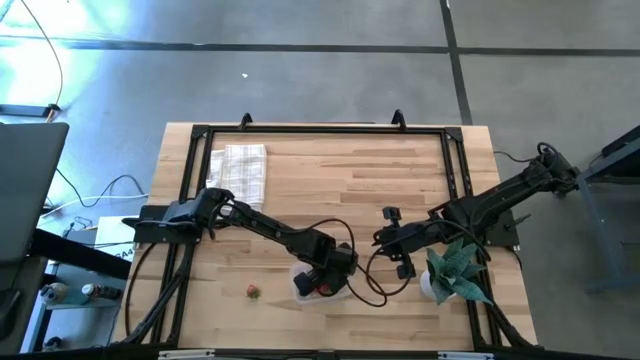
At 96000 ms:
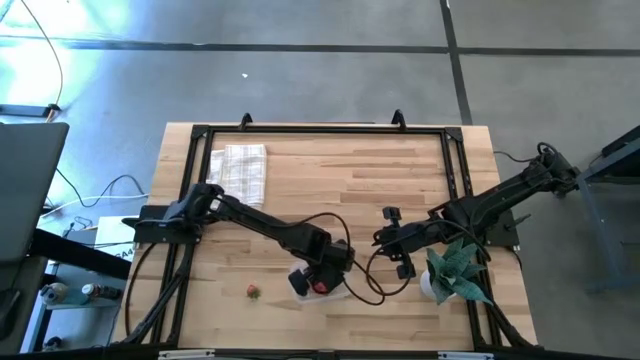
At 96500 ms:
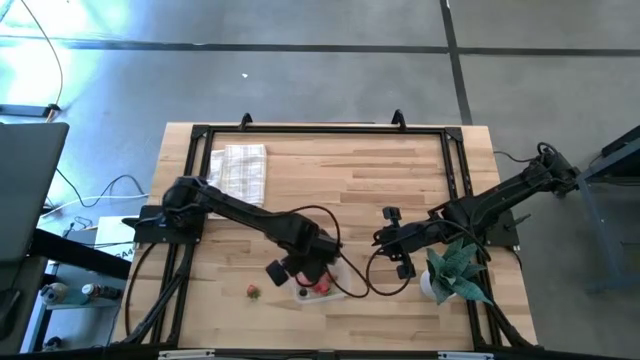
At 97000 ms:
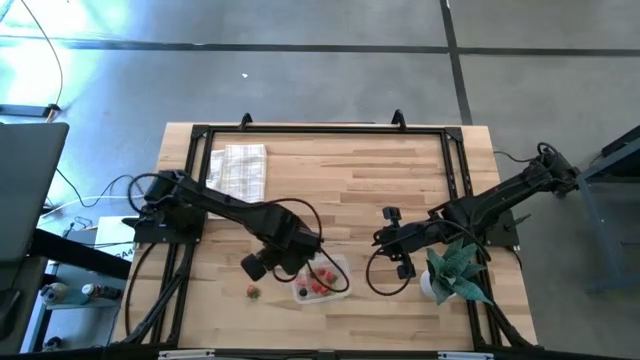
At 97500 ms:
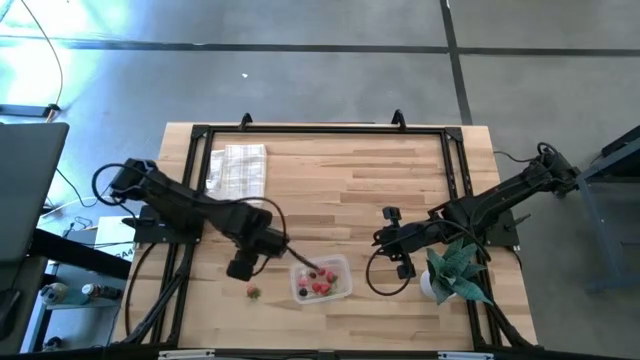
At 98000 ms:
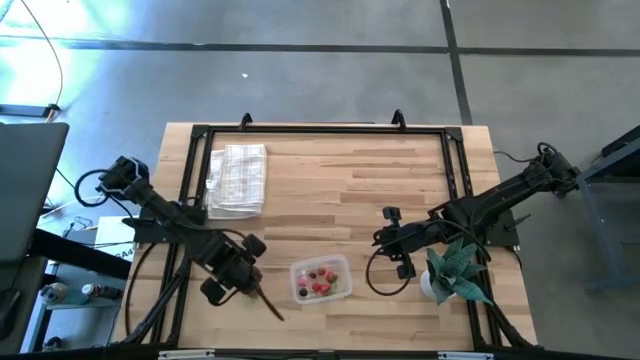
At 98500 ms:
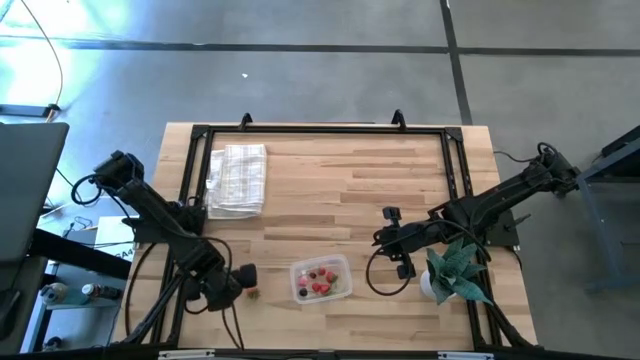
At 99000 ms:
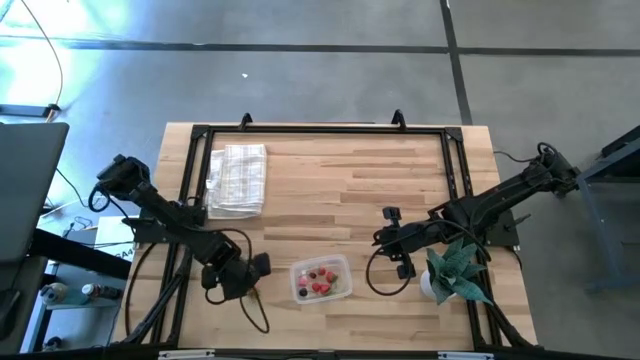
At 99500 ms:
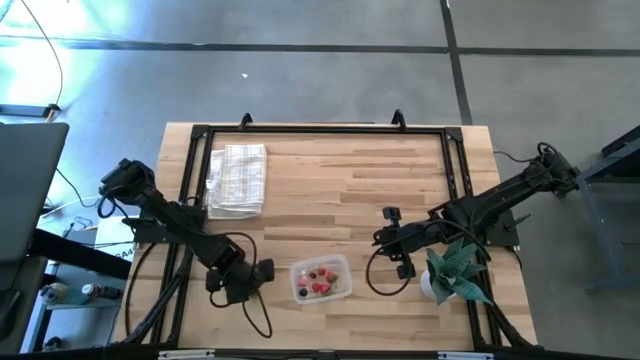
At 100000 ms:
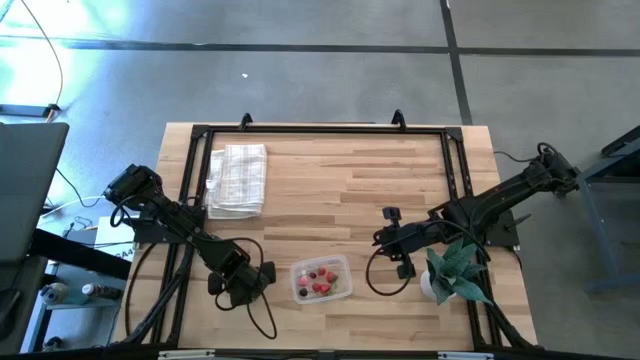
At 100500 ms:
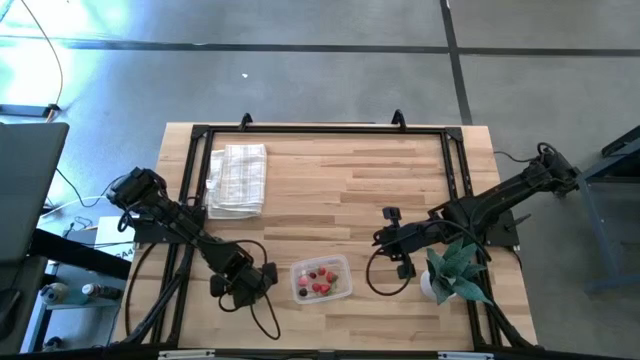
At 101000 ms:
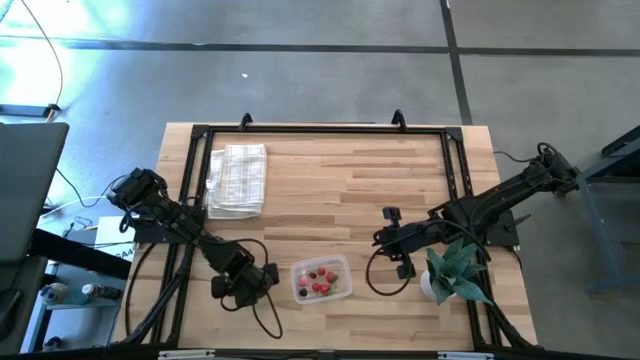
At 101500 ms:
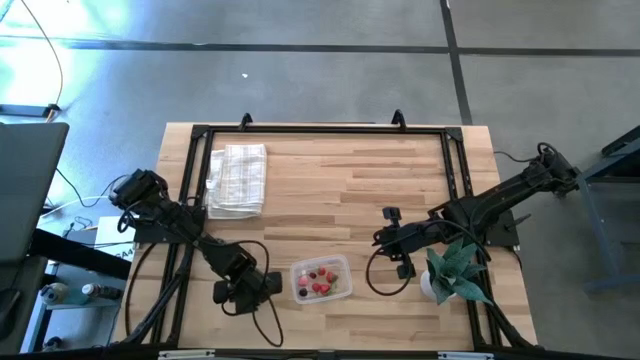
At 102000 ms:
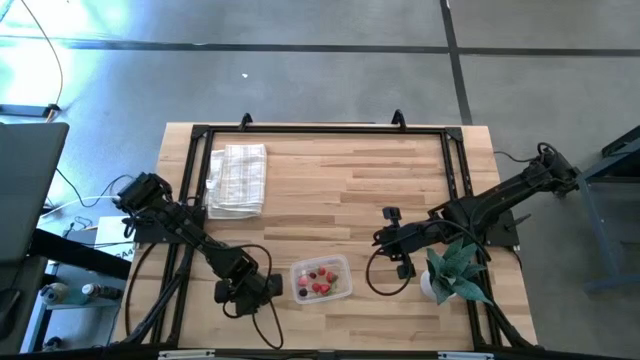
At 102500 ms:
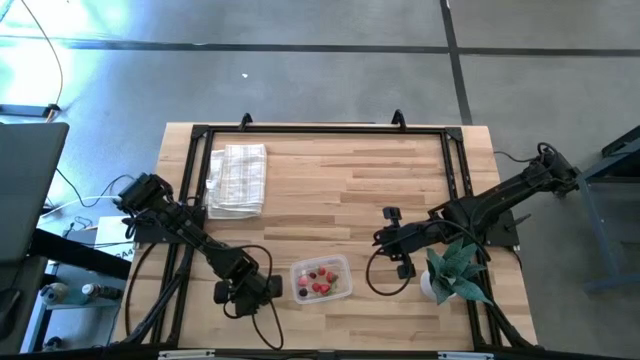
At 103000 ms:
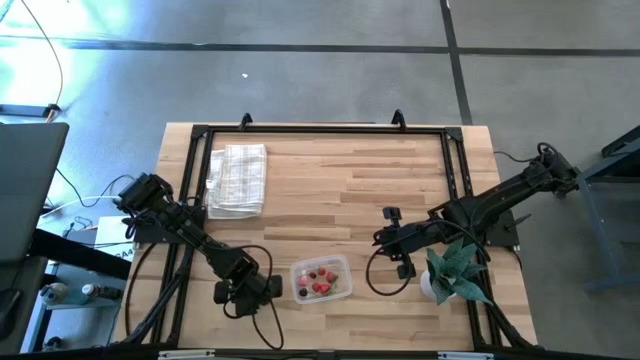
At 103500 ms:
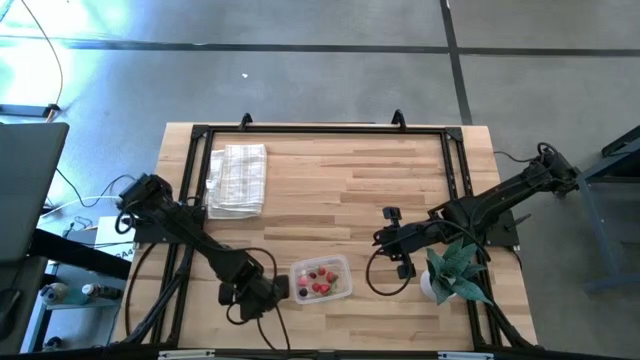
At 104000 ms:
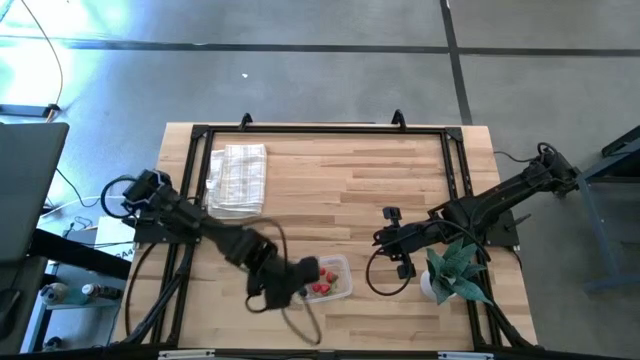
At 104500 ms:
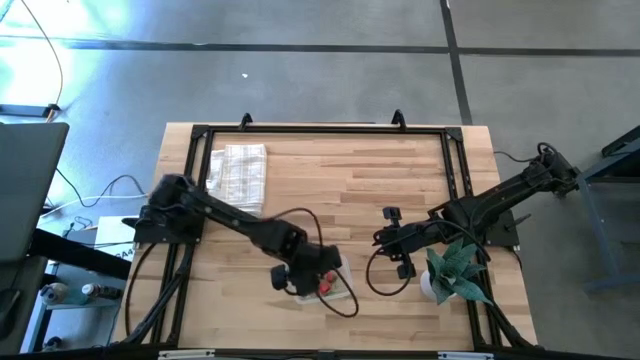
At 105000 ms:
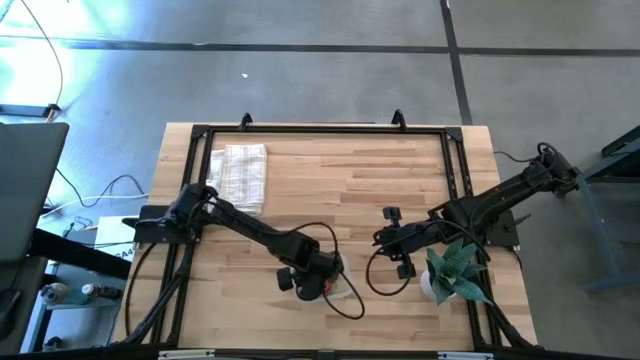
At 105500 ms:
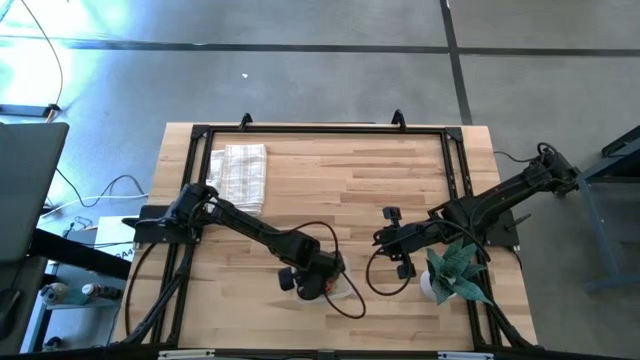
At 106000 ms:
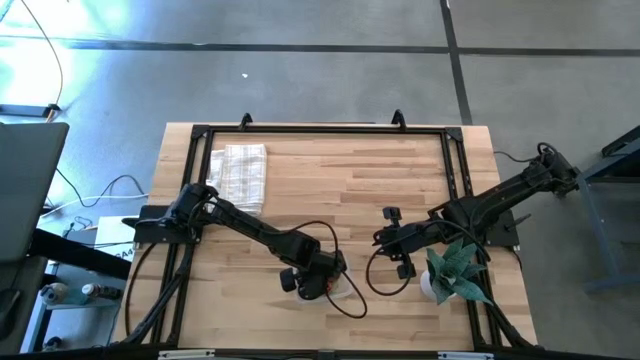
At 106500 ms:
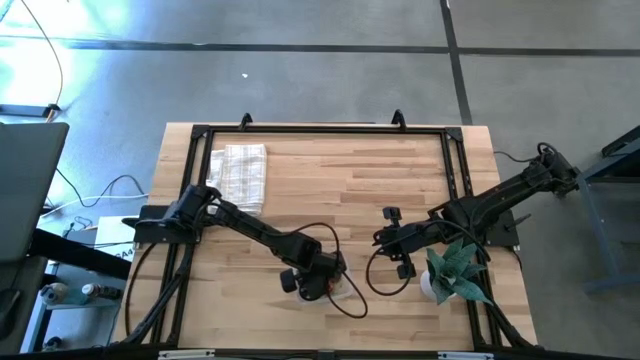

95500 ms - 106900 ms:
Task: Pick and placing Produce into tupperware
Put the red strawberry into the transparent bin

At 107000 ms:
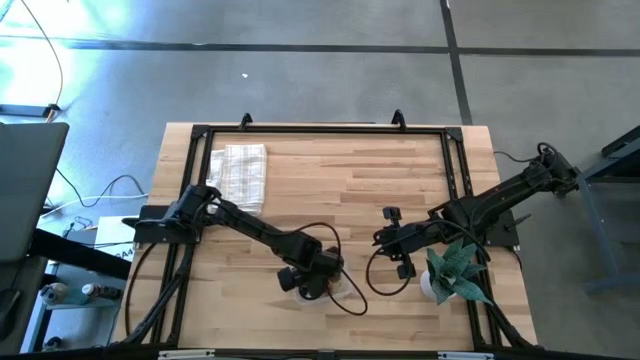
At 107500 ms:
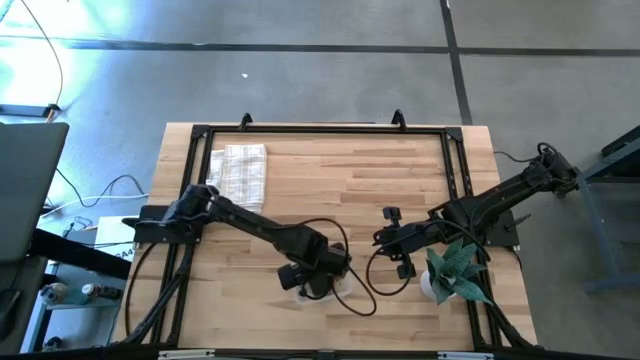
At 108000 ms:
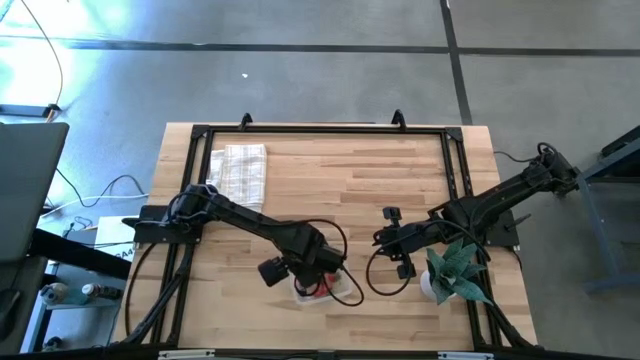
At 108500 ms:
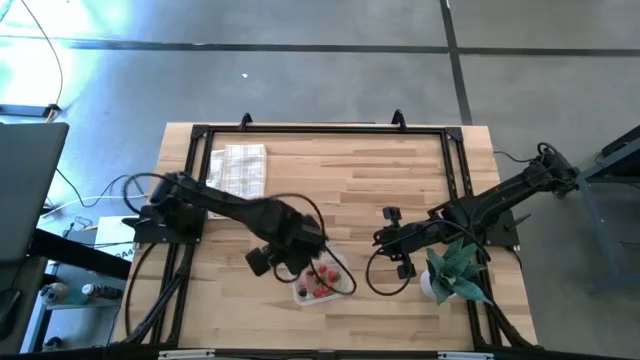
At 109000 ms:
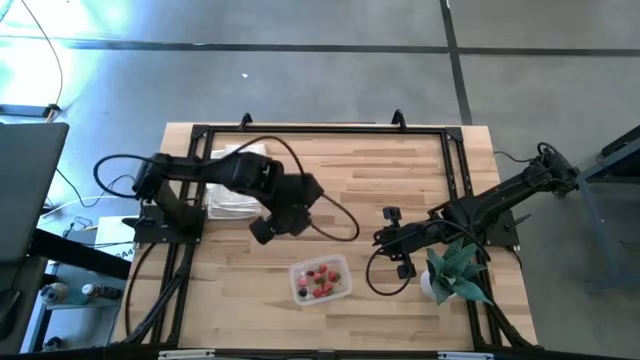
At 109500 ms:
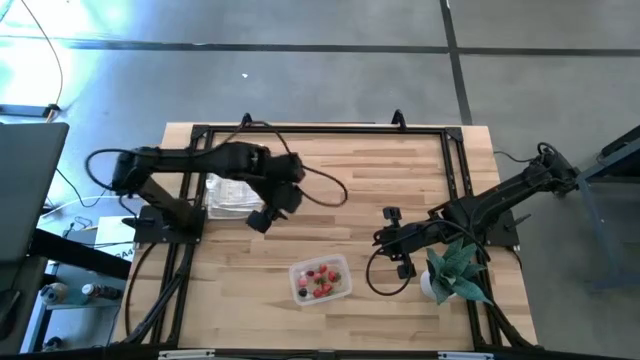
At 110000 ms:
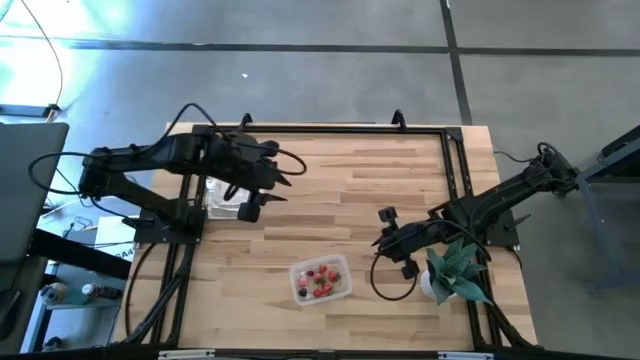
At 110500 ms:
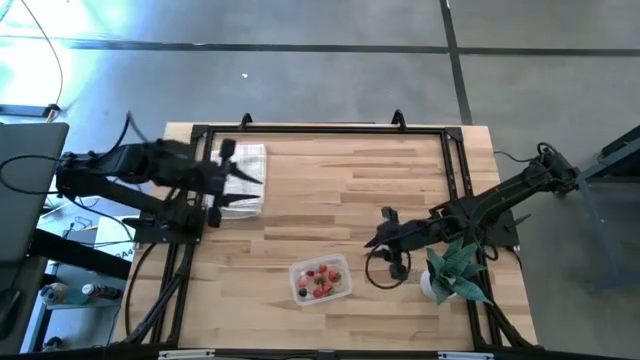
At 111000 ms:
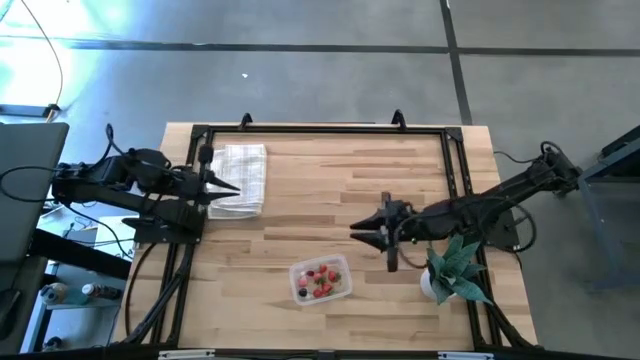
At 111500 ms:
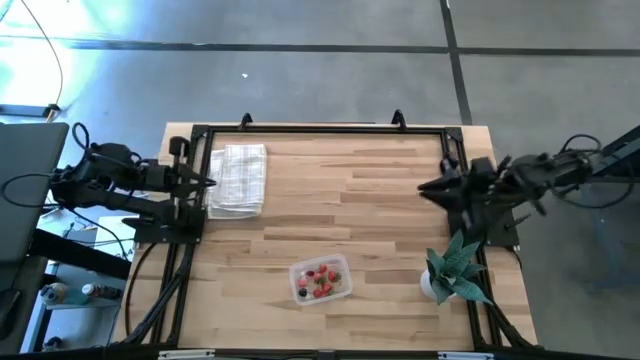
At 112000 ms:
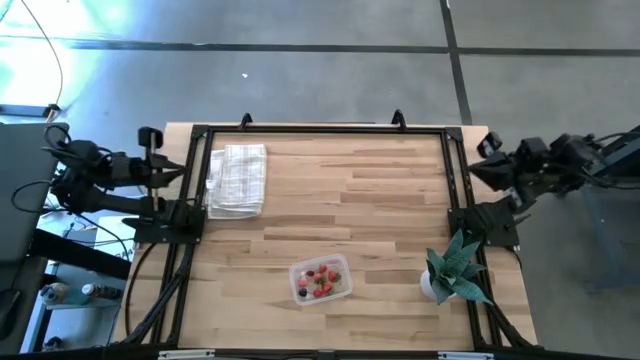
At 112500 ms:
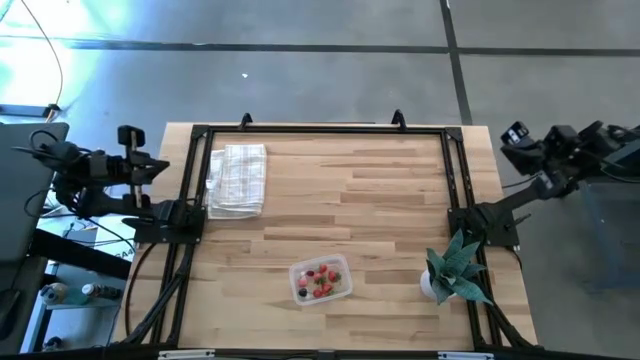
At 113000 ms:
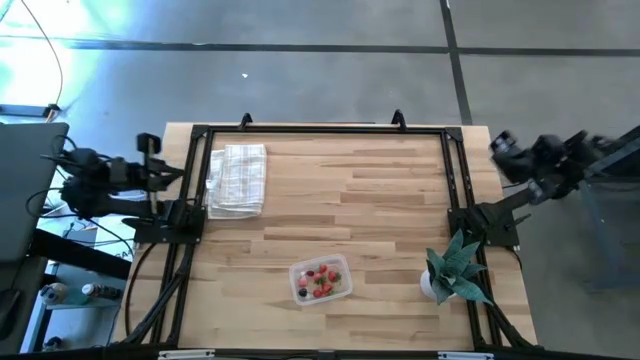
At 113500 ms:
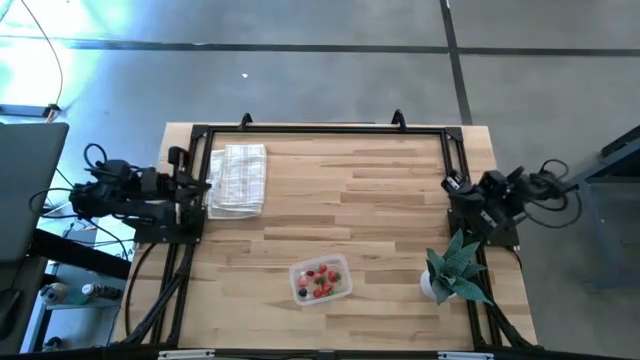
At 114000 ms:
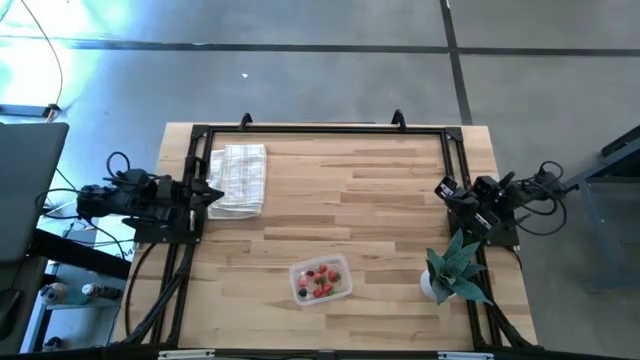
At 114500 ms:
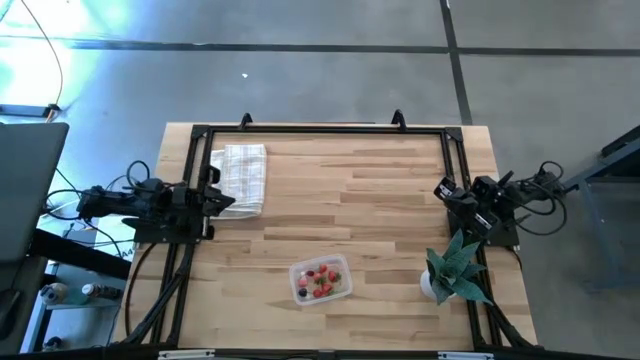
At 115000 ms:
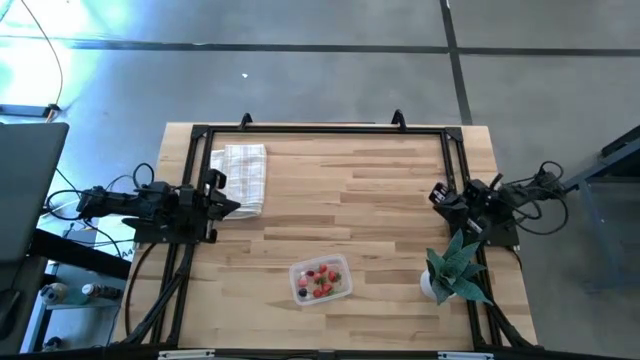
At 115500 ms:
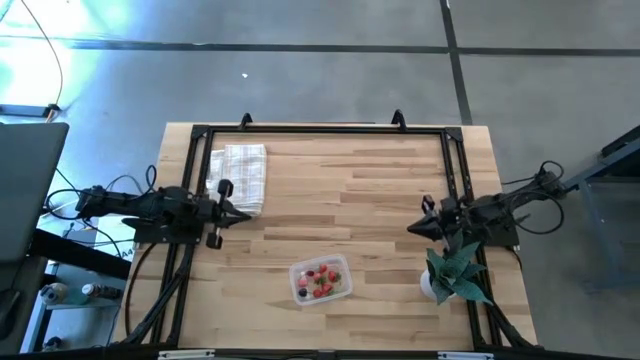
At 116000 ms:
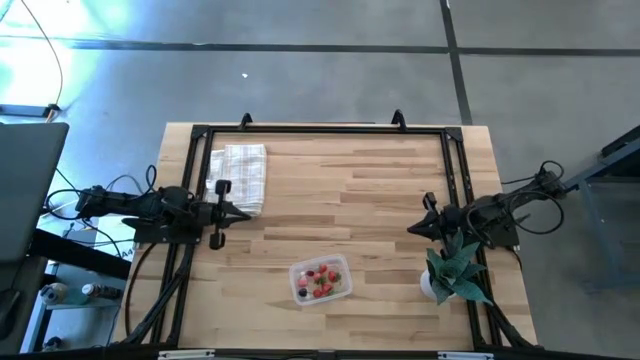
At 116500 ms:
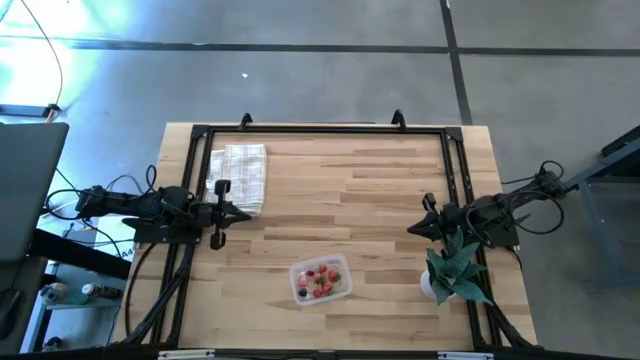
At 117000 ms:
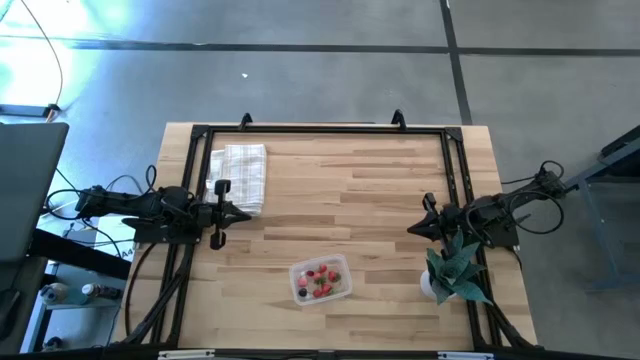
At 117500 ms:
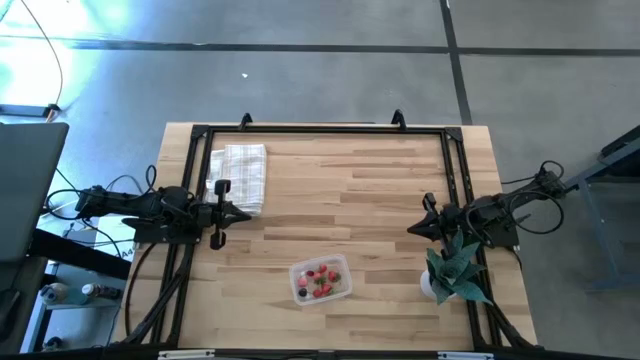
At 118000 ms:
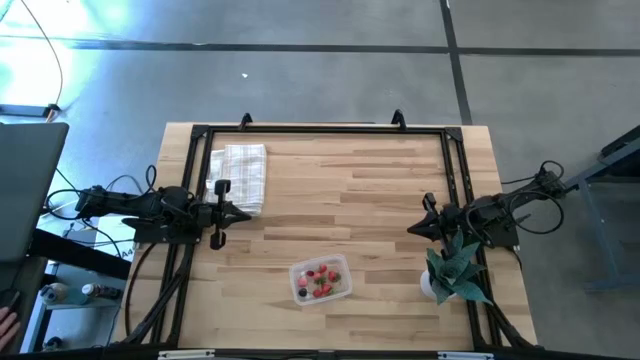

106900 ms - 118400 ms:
Return to Home Position
